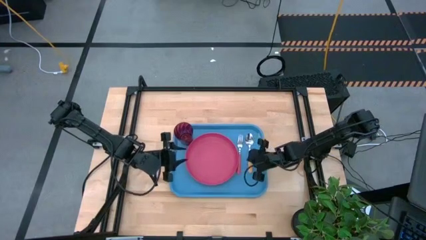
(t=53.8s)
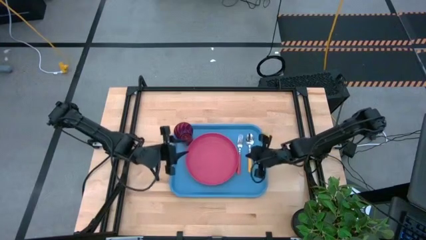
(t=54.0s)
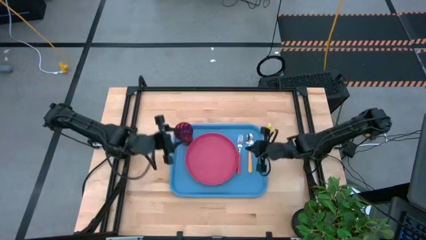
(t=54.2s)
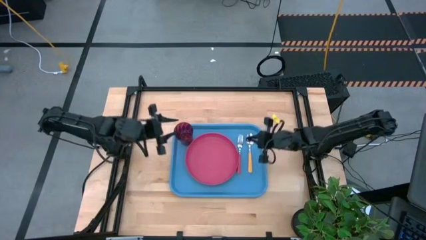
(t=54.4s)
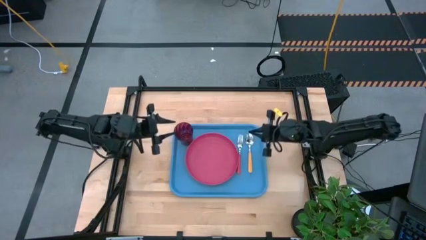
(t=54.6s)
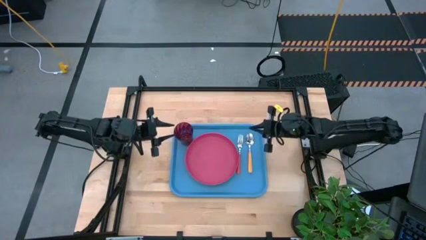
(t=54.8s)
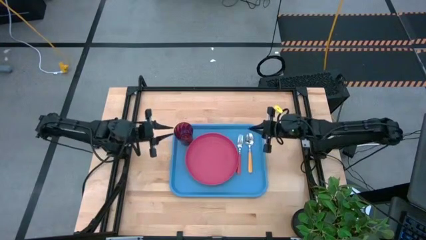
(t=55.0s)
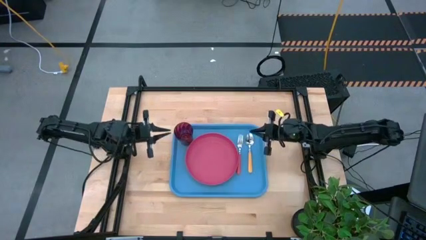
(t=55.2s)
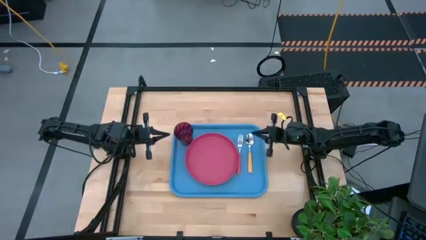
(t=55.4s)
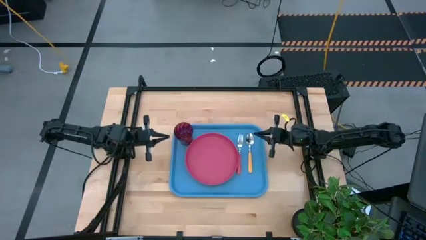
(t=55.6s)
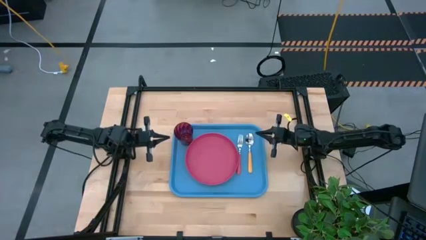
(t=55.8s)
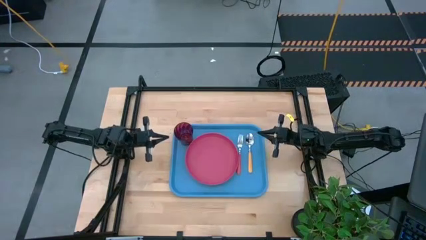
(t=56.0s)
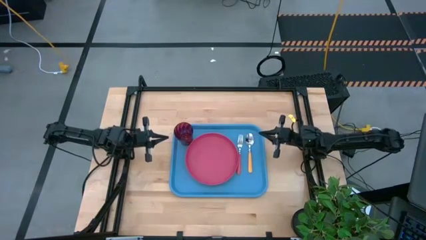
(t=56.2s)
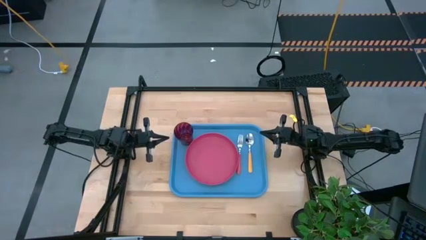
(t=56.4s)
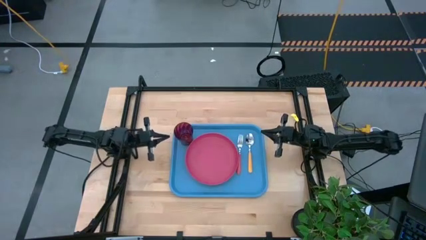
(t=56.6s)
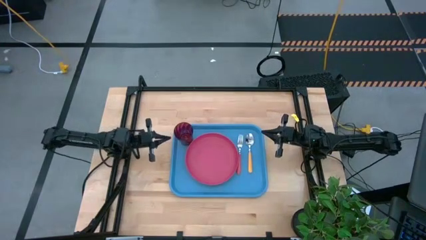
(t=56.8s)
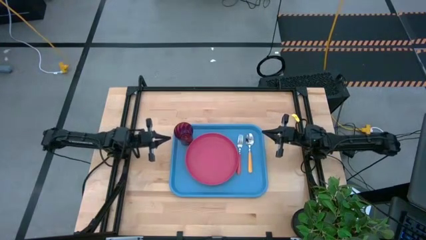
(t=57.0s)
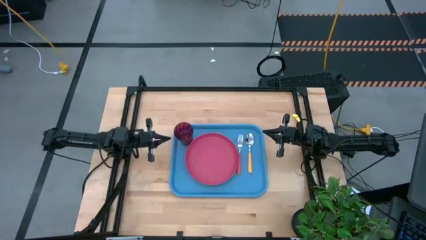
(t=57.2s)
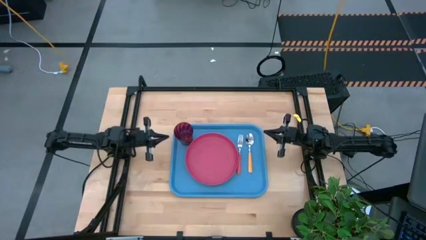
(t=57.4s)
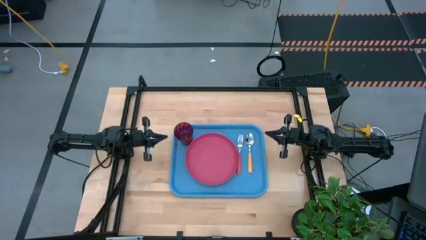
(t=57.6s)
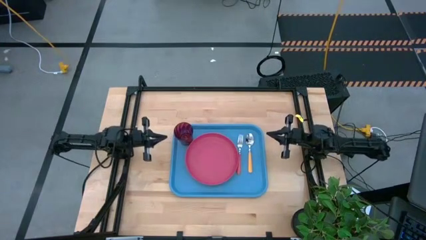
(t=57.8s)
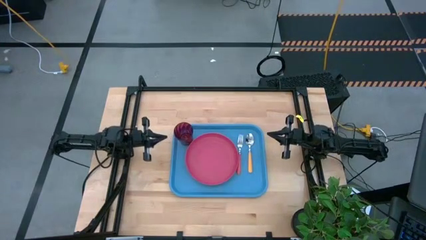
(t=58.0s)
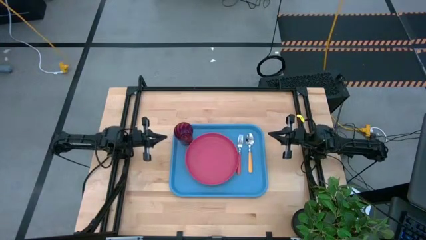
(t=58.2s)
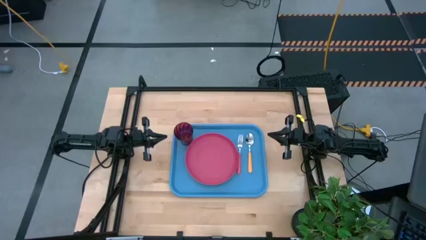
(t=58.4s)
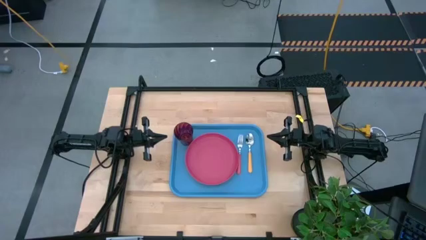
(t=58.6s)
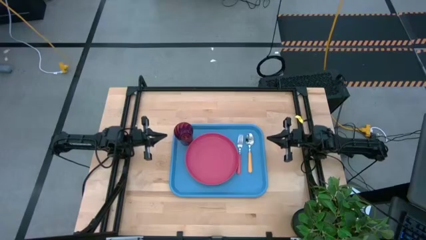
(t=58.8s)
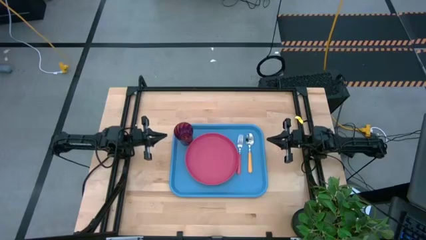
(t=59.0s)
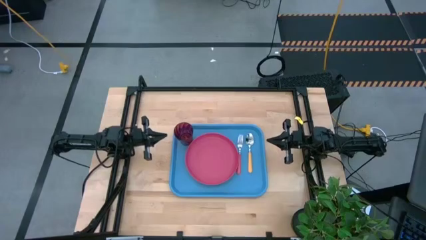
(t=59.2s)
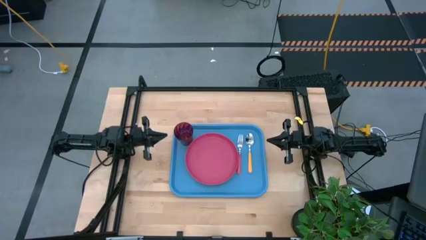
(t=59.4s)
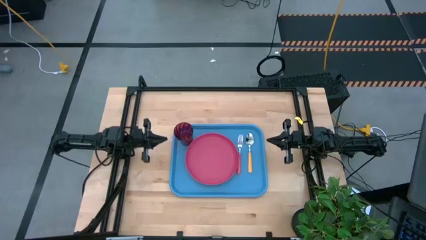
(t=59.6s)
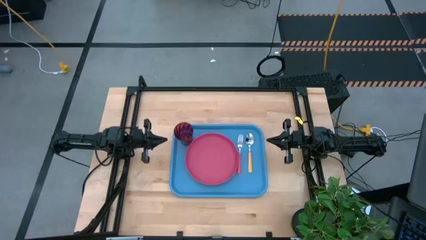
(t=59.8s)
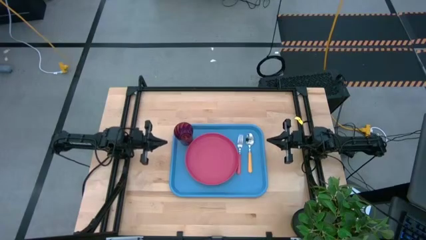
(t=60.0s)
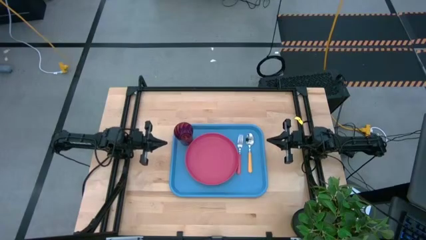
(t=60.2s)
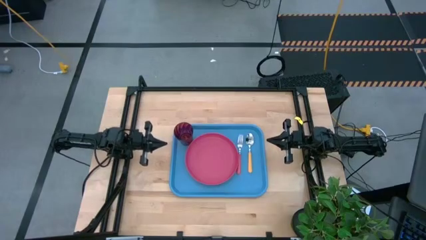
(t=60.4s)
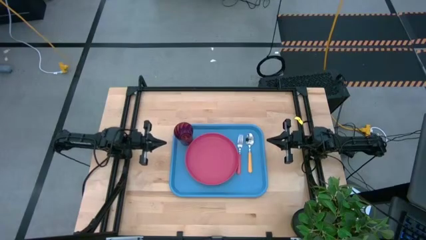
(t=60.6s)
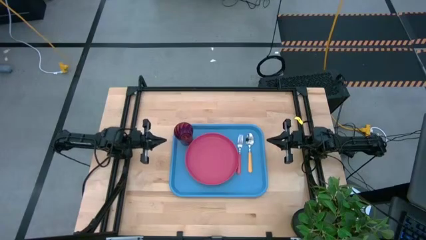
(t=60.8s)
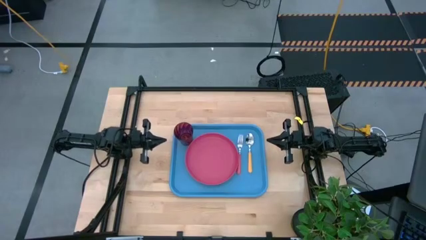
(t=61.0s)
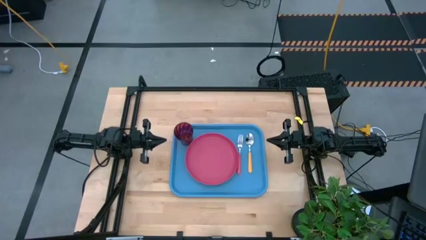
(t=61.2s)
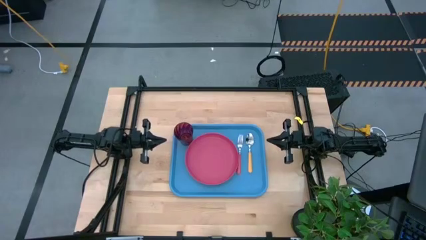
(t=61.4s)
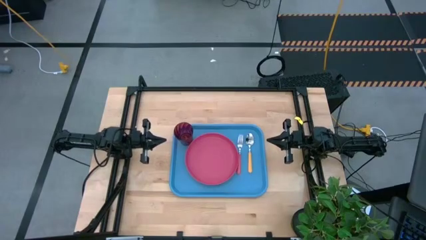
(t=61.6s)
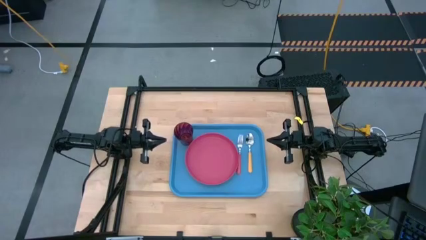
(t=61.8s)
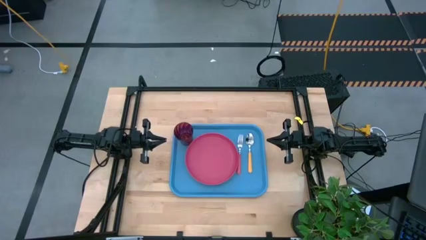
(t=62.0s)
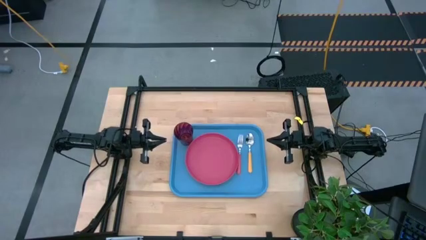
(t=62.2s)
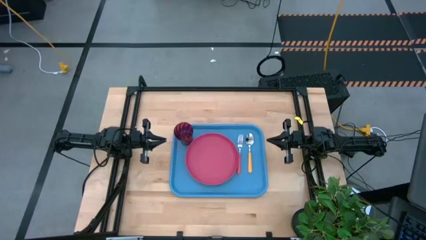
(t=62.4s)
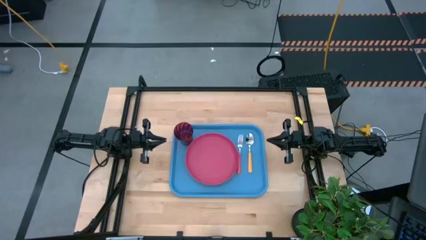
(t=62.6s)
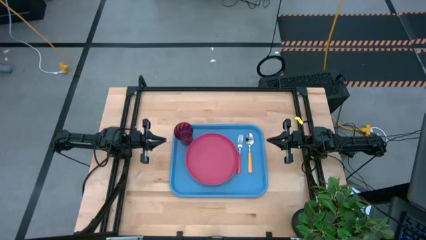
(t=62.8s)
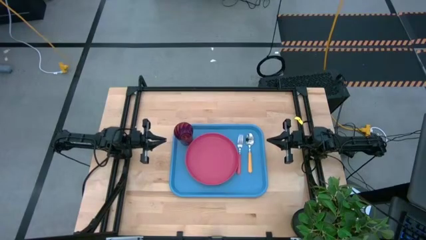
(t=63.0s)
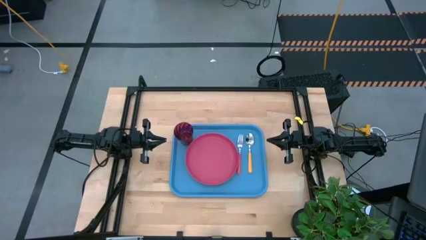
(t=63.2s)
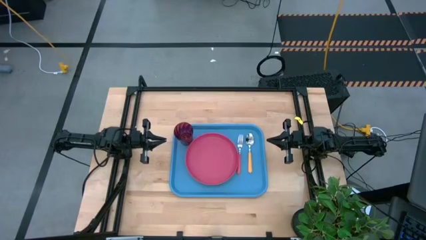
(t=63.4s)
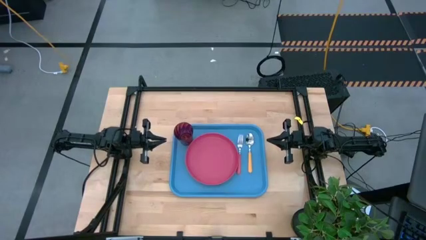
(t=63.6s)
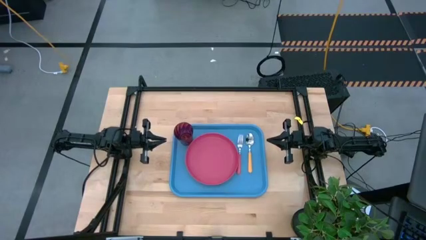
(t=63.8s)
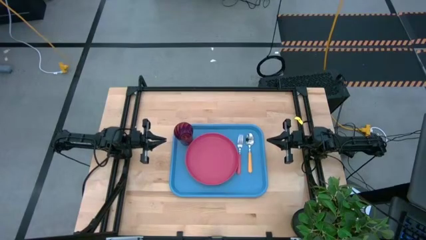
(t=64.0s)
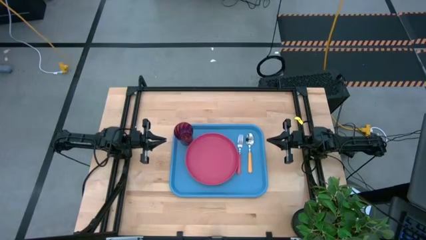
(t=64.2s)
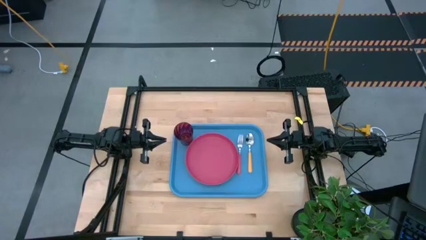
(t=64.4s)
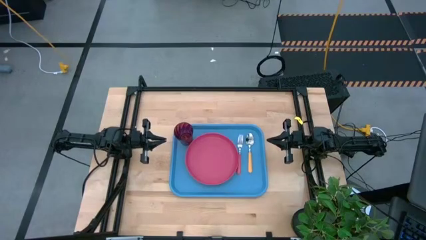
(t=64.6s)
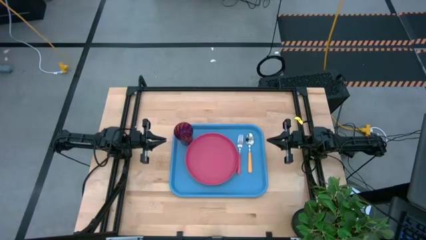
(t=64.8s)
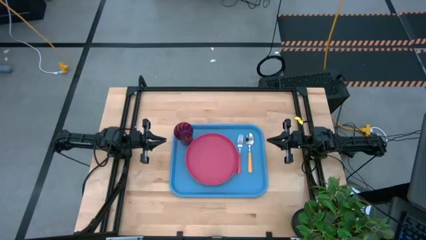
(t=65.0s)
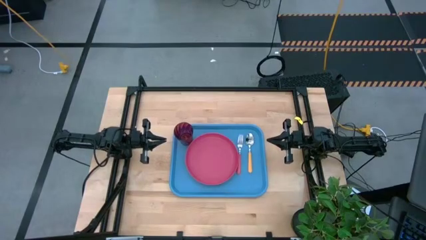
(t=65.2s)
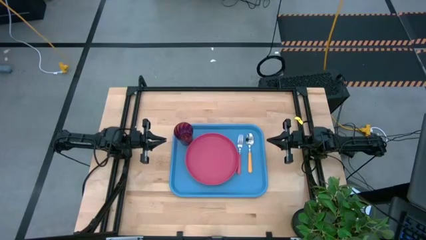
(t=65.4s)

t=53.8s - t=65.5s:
Task: Pick and place plate/cup/fork/spoon on tray
Return to Home Position
